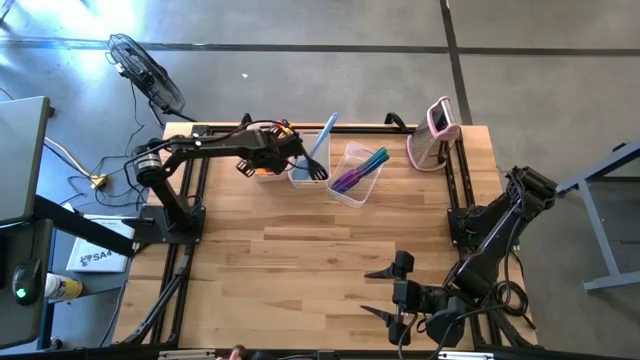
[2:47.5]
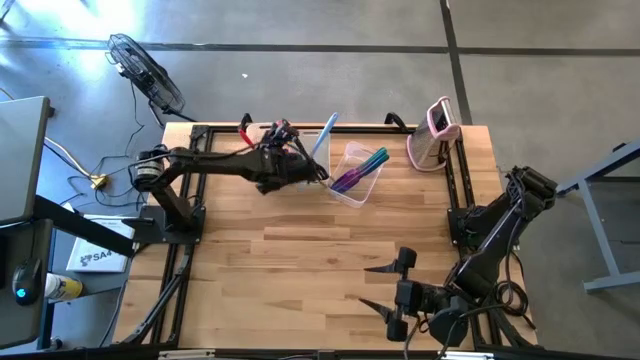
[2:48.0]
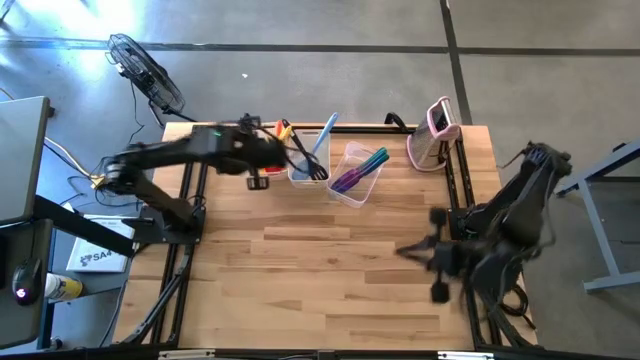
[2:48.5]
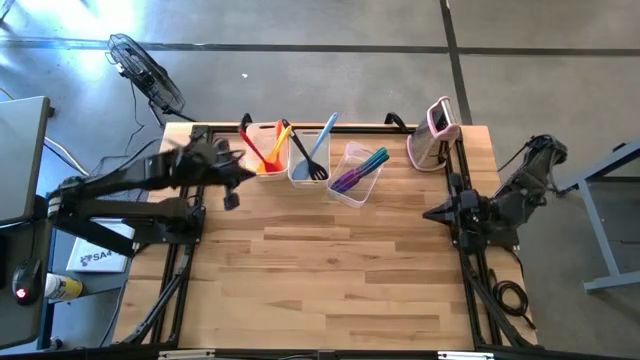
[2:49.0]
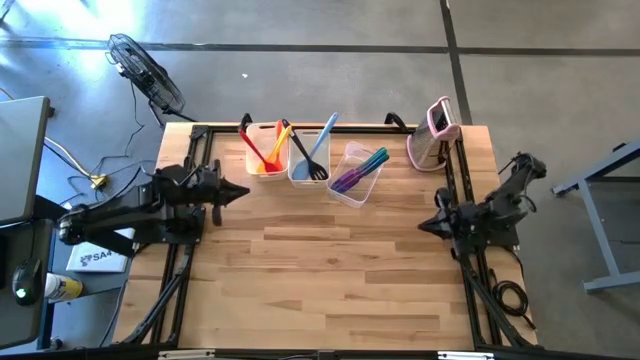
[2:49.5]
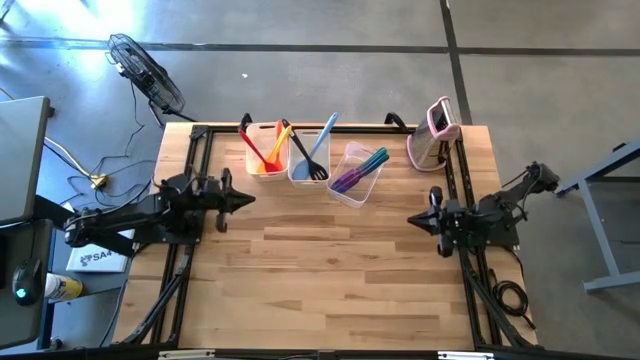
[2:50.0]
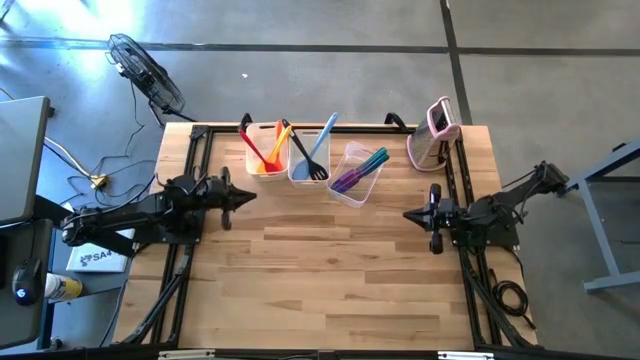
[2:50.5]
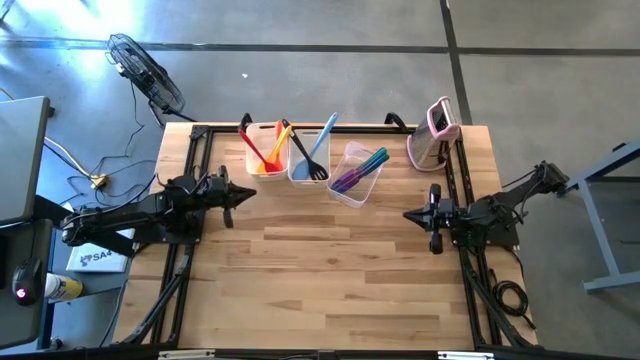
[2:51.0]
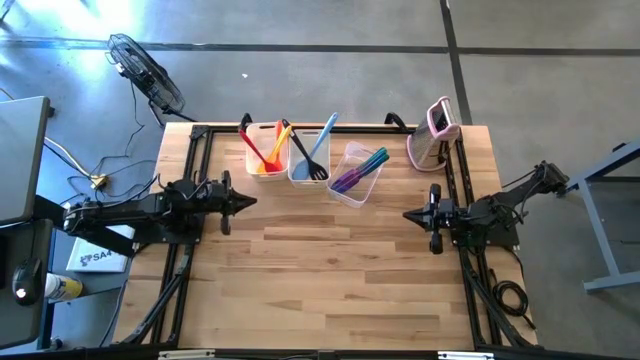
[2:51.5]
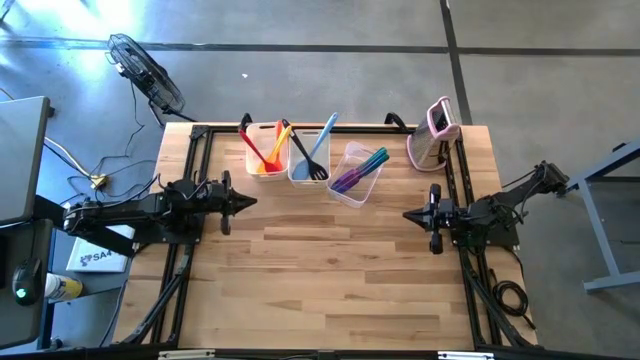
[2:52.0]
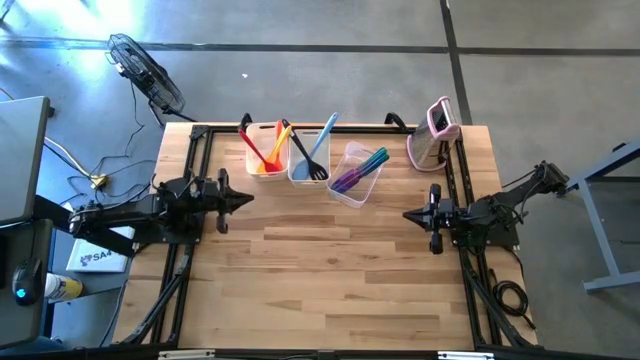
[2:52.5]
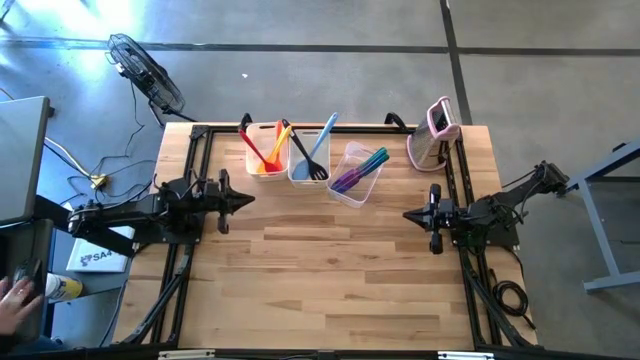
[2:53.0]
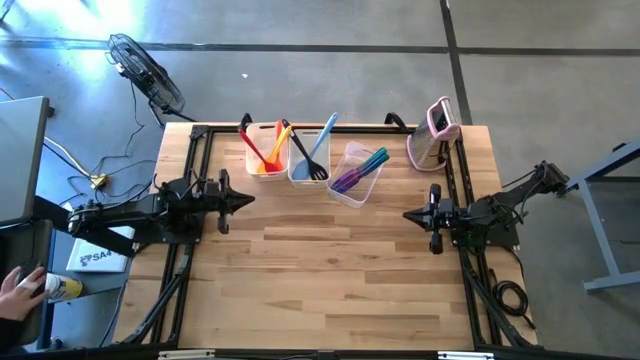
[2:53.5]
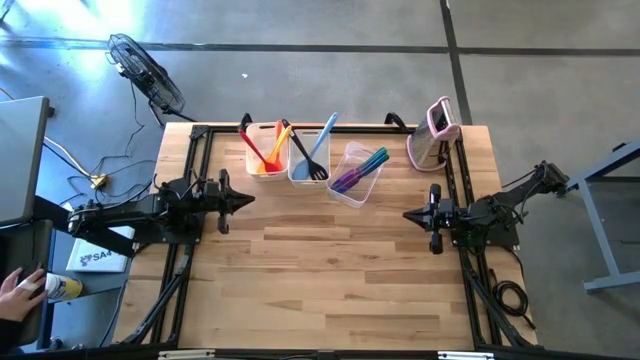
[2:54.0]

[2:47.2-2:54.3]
Task: Pick & Place Kitchen Items
Return to Home Position

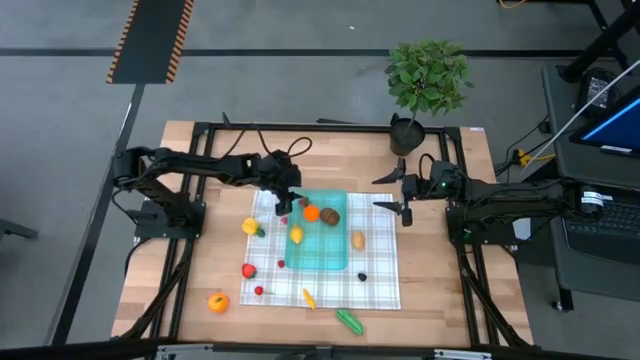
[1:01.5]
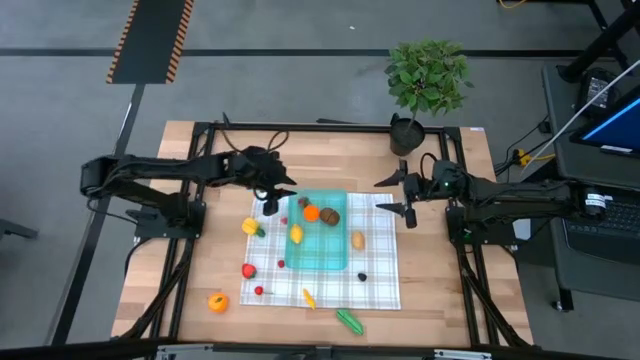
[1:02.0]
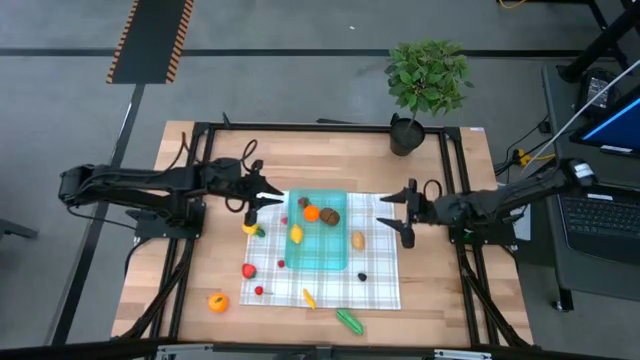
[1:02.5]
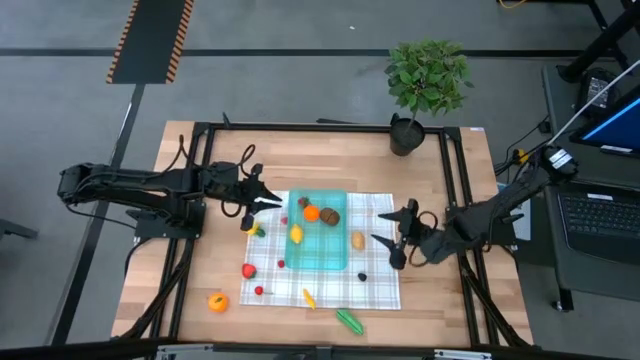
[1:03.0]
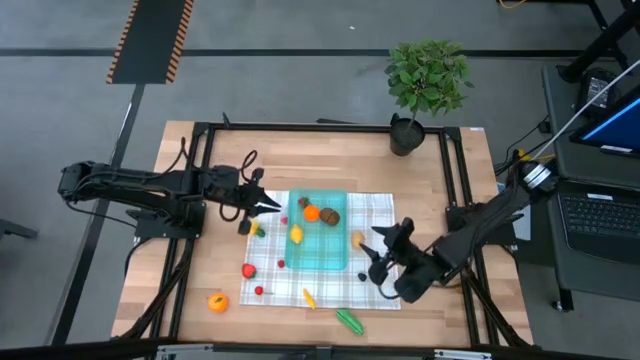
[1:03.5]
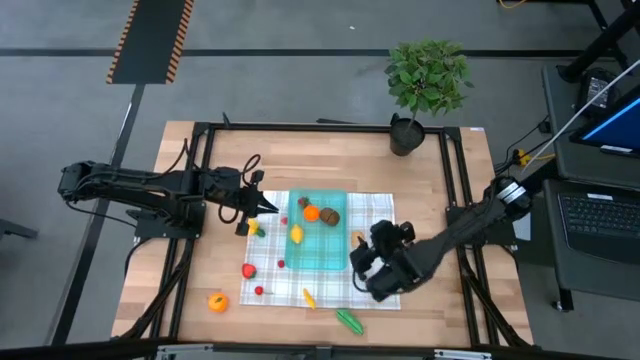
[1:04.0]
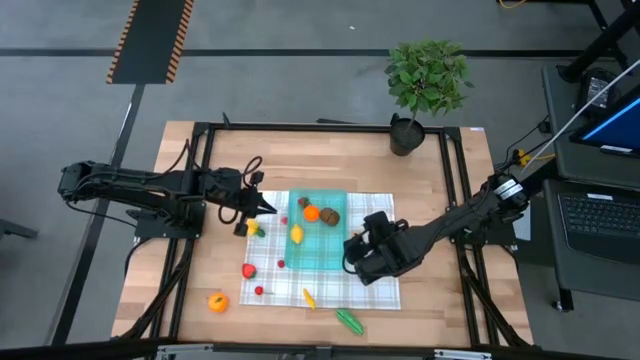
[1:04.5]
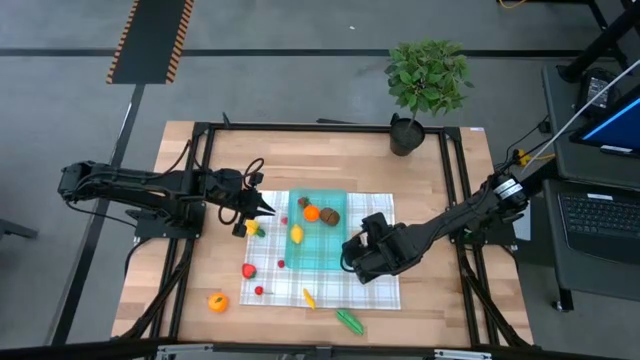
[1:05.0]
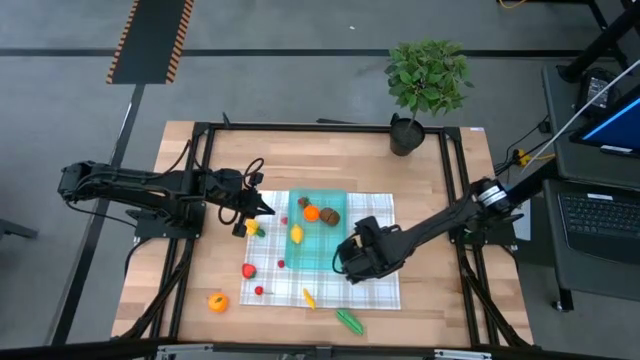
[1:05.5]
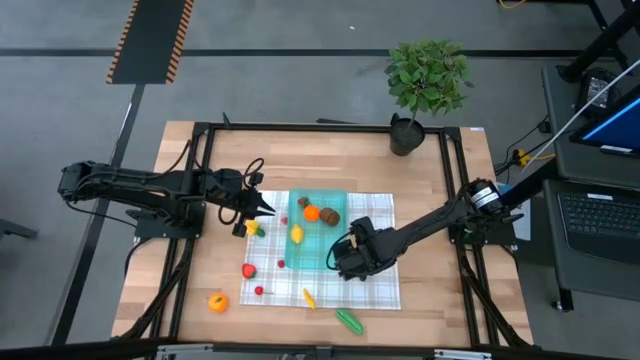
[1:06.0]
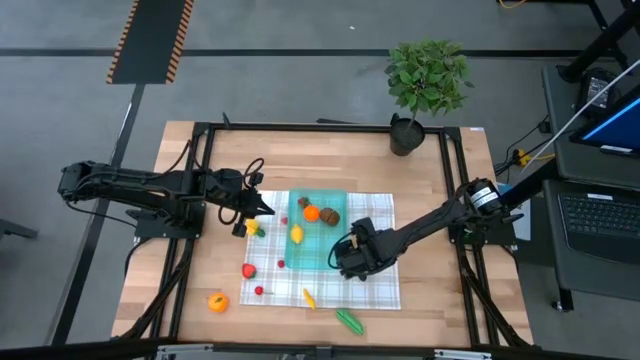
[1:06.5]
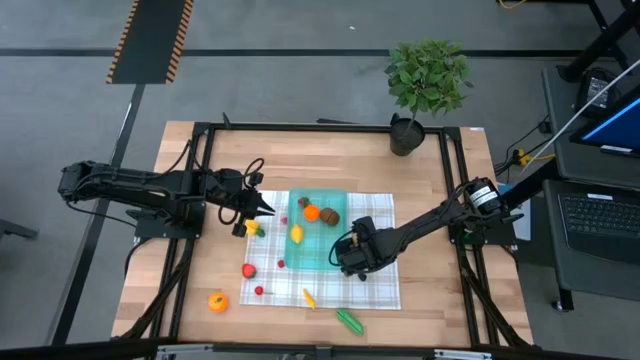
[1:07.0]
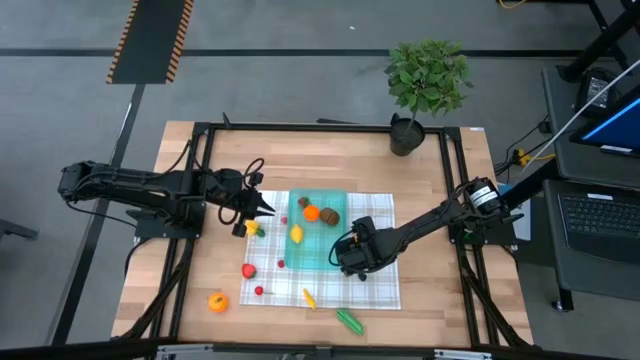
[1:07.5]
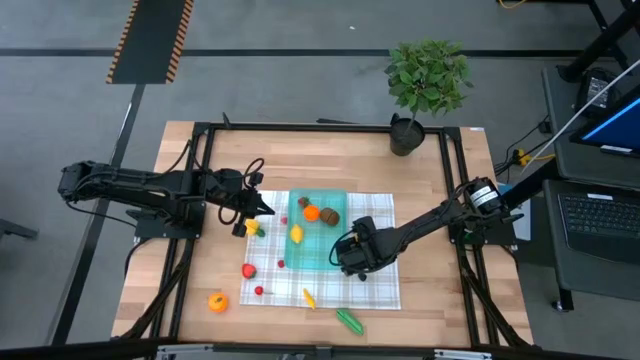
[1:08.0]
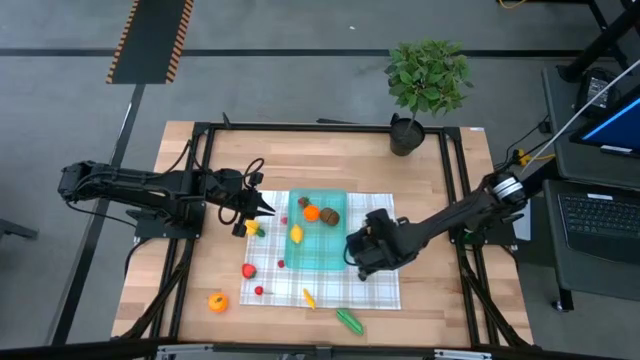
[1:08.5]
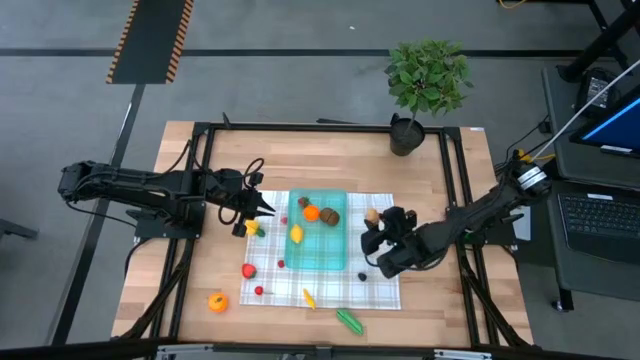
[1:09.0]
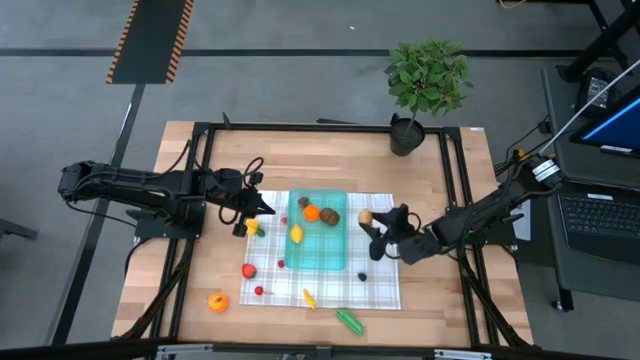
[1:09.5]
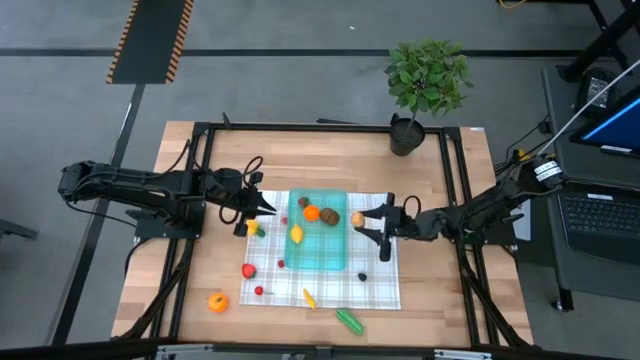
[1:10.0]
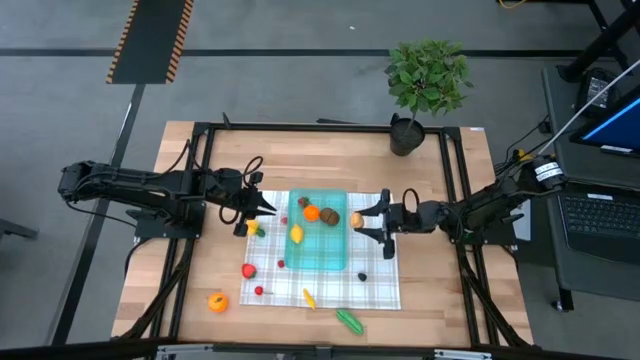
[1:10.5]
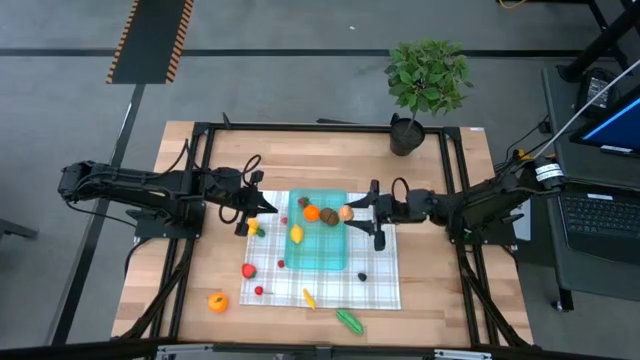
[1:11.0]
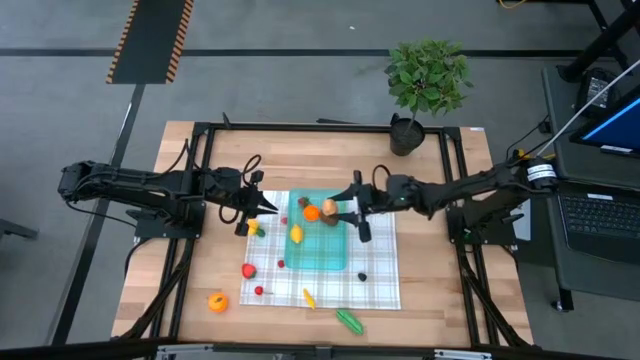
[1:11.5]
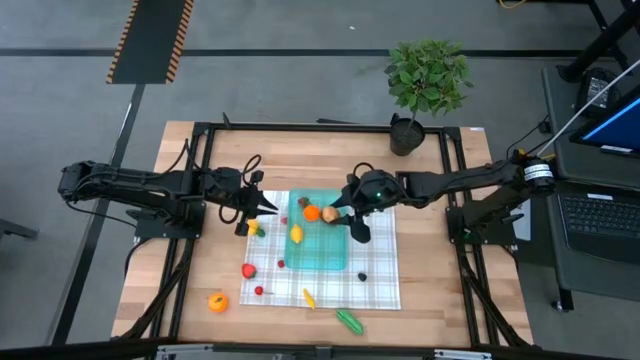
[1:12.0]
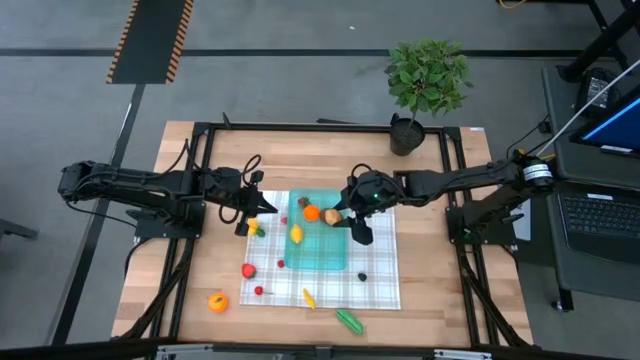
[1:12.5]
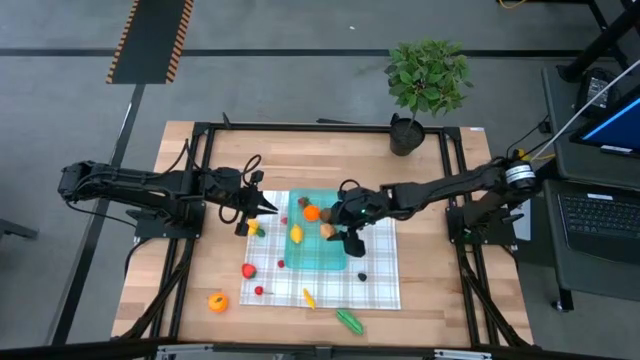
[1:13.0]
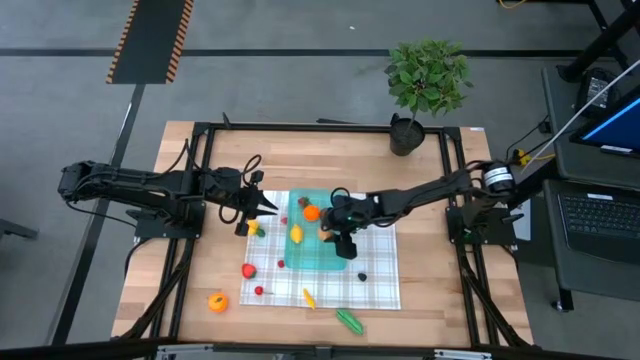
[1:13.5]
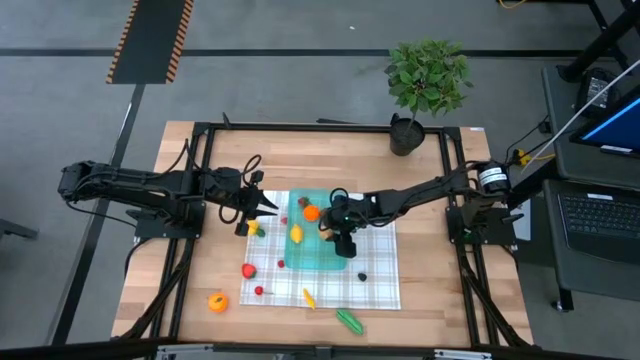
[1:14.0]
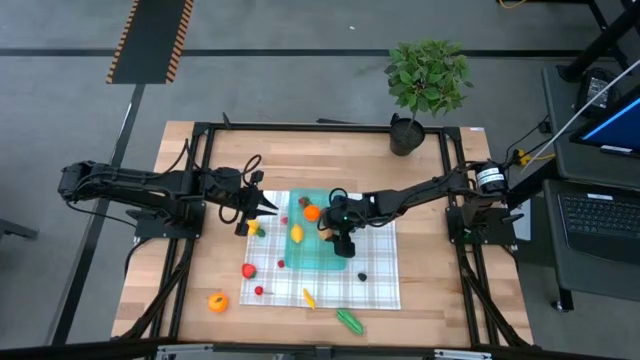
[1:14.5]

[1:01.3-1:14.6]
Task: Pick and placing Produce into tupperware
Put the brown potato into the blue bin
